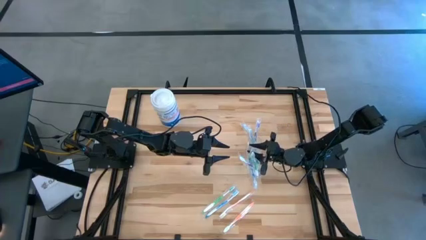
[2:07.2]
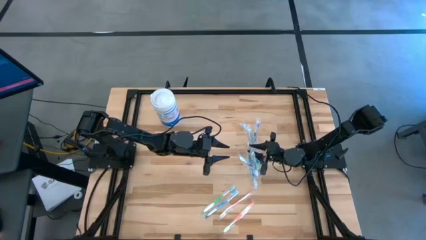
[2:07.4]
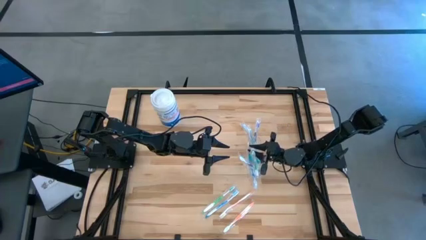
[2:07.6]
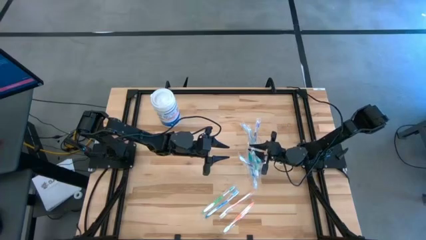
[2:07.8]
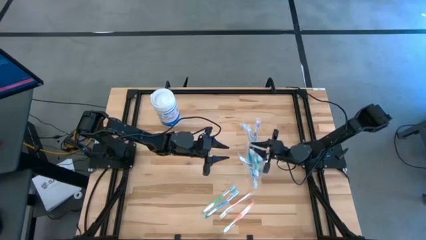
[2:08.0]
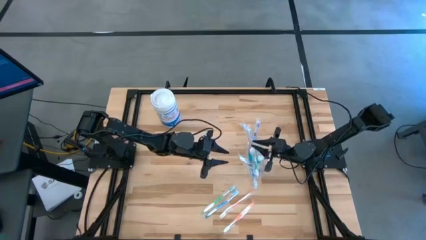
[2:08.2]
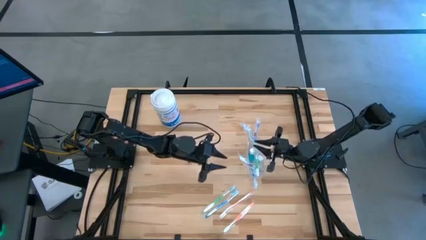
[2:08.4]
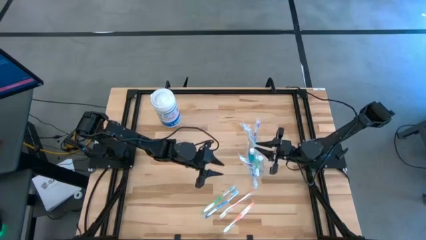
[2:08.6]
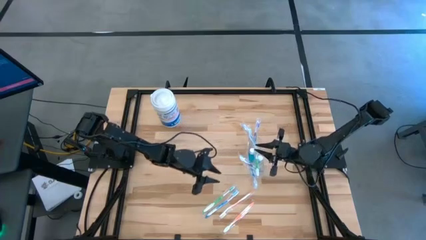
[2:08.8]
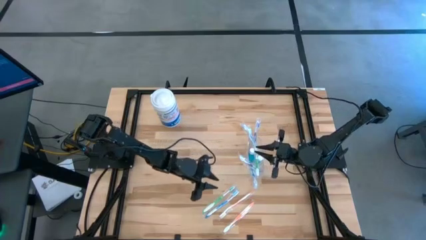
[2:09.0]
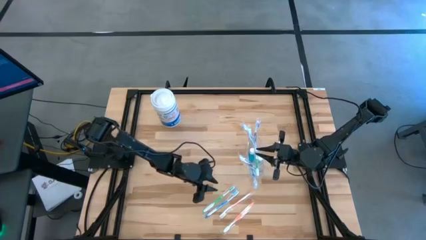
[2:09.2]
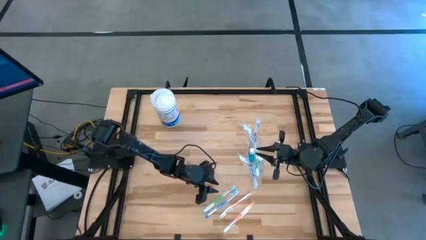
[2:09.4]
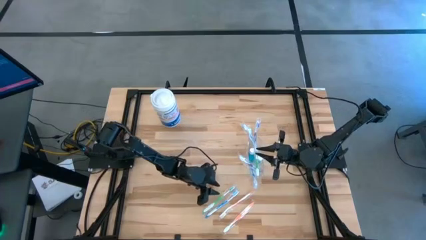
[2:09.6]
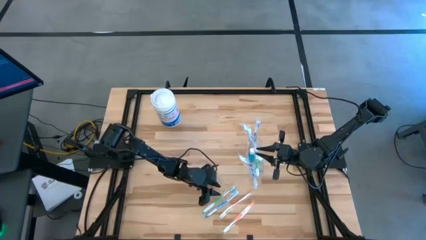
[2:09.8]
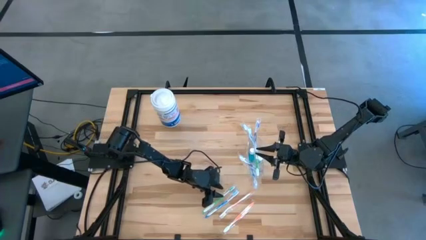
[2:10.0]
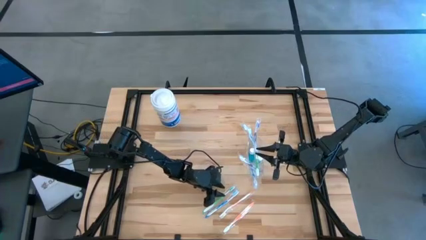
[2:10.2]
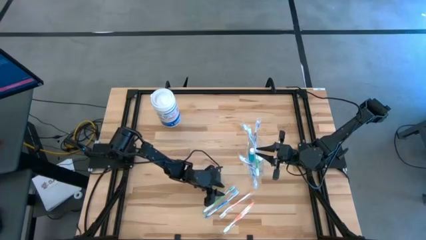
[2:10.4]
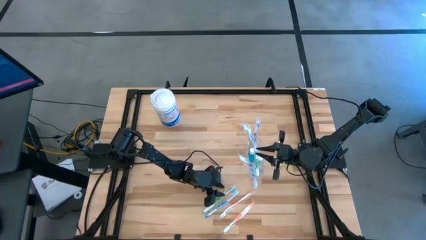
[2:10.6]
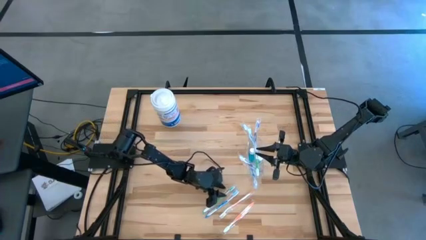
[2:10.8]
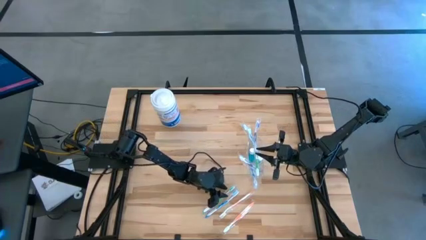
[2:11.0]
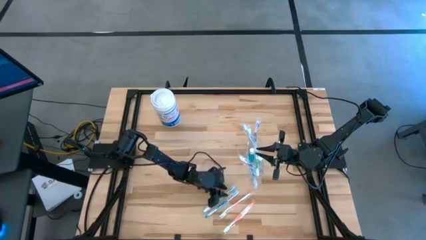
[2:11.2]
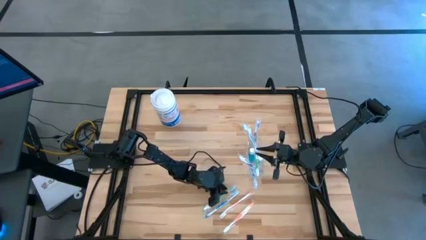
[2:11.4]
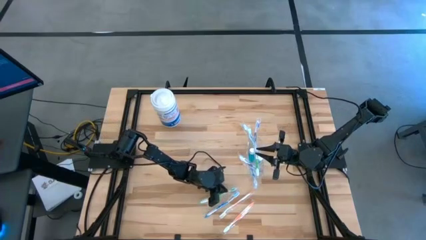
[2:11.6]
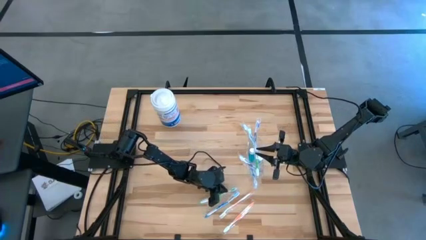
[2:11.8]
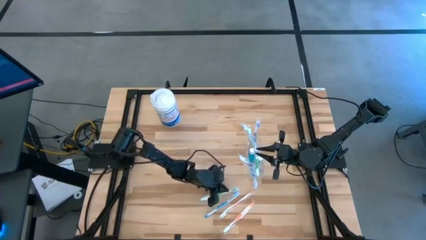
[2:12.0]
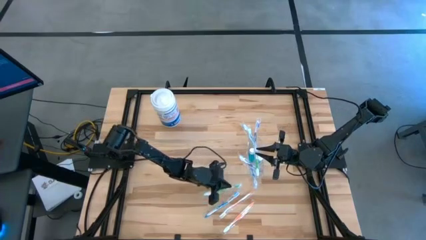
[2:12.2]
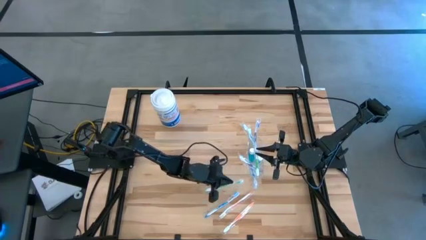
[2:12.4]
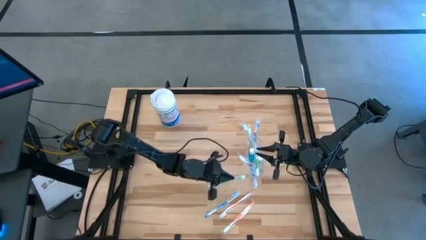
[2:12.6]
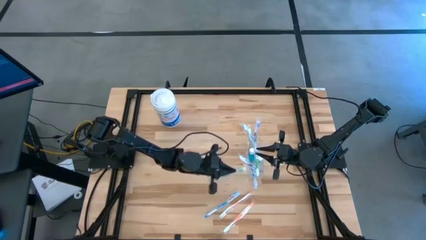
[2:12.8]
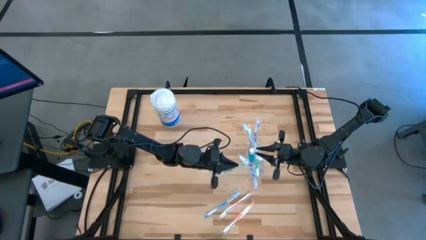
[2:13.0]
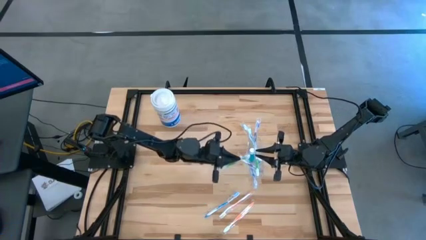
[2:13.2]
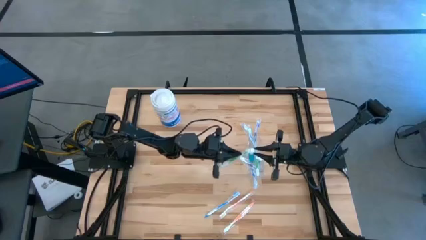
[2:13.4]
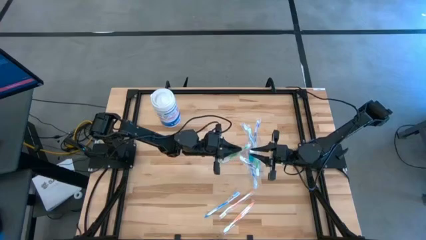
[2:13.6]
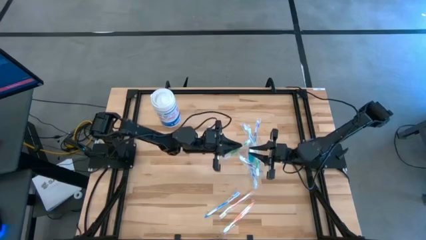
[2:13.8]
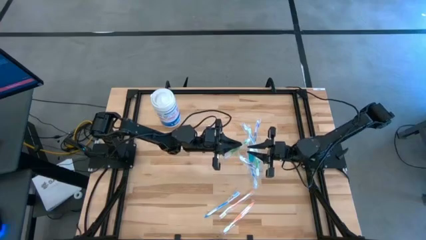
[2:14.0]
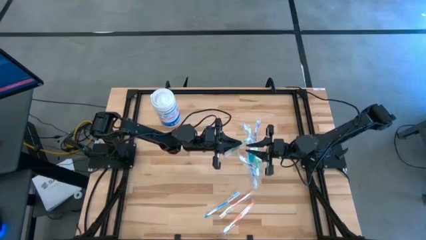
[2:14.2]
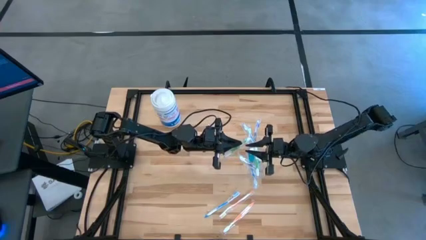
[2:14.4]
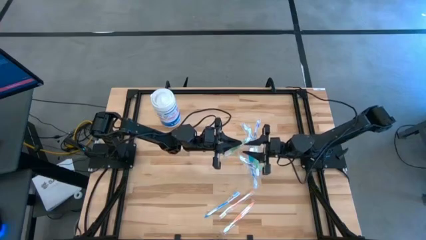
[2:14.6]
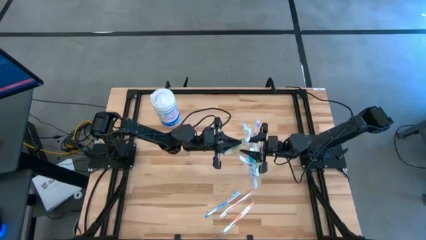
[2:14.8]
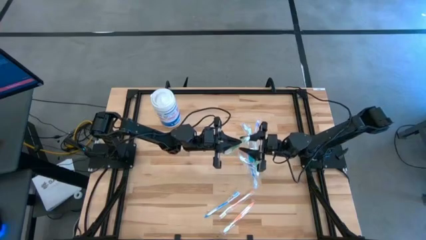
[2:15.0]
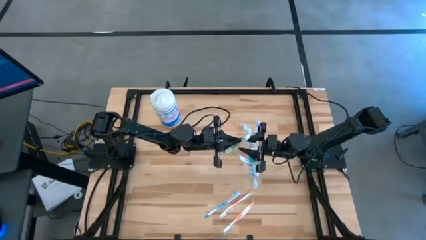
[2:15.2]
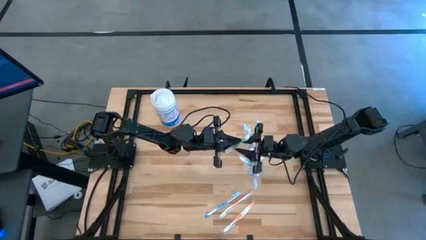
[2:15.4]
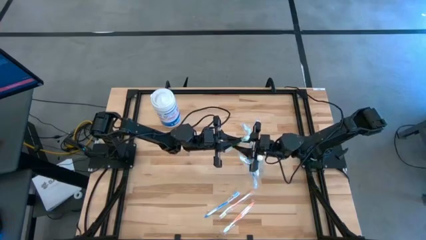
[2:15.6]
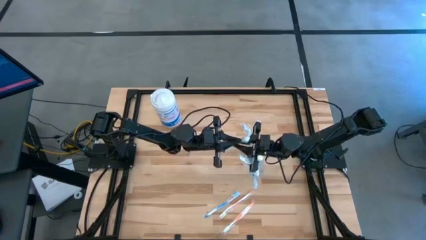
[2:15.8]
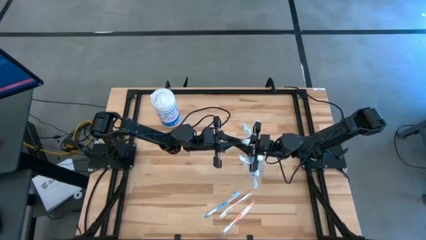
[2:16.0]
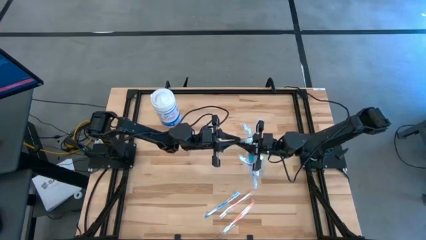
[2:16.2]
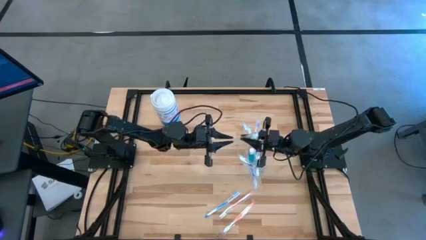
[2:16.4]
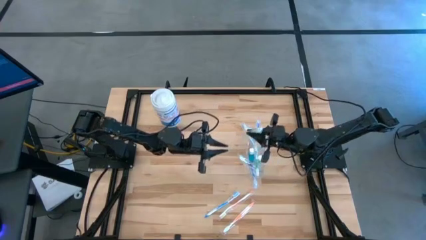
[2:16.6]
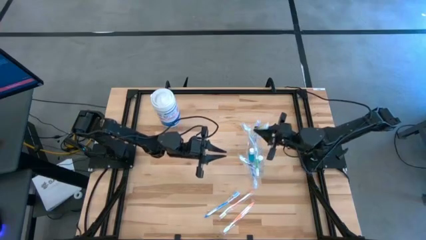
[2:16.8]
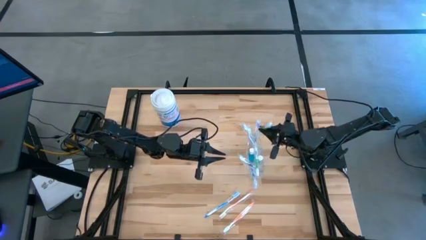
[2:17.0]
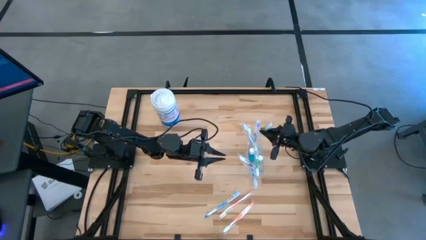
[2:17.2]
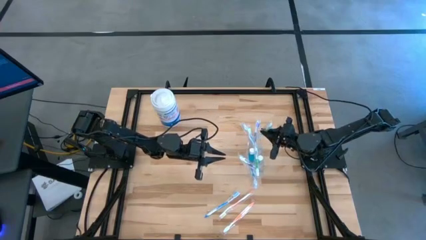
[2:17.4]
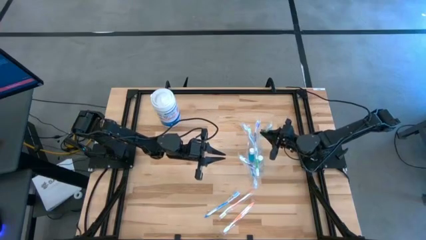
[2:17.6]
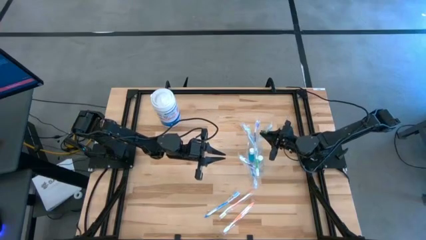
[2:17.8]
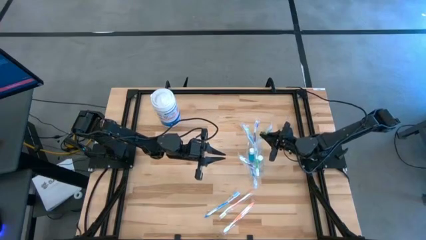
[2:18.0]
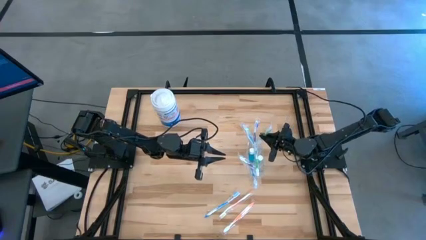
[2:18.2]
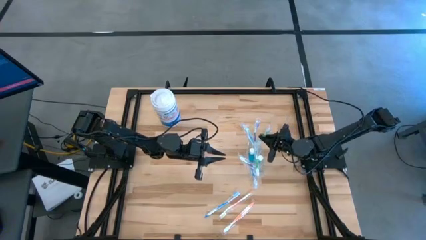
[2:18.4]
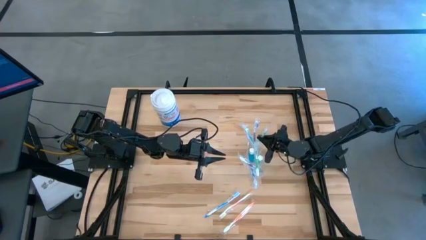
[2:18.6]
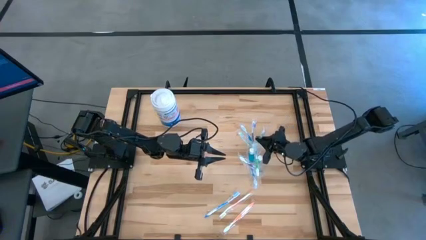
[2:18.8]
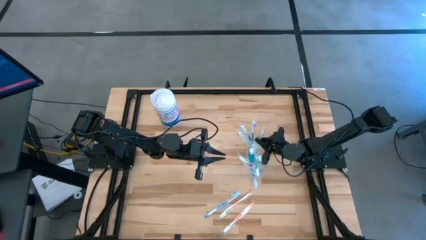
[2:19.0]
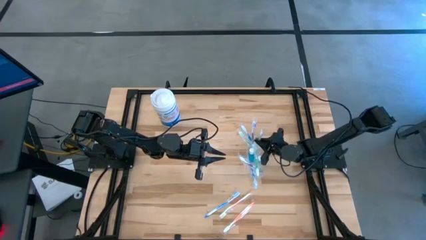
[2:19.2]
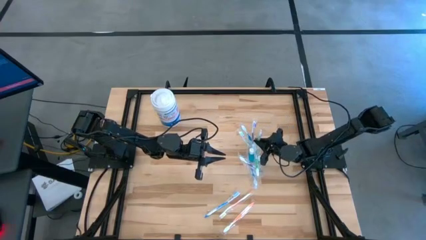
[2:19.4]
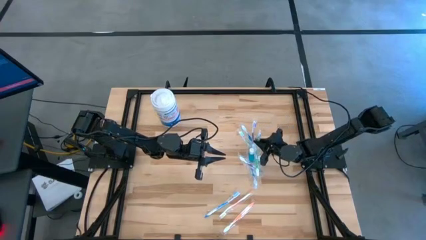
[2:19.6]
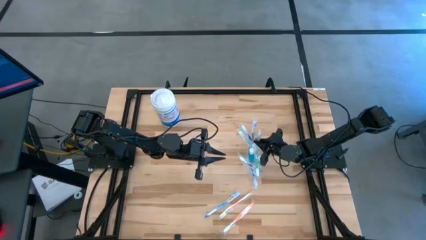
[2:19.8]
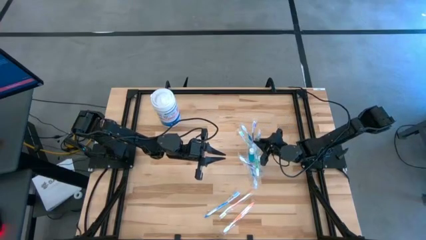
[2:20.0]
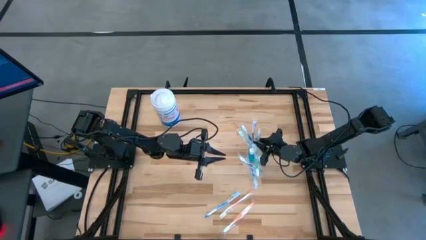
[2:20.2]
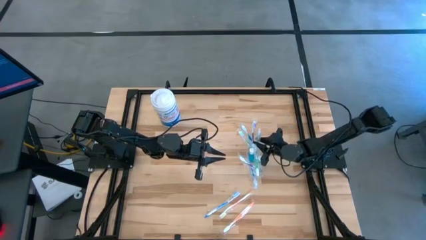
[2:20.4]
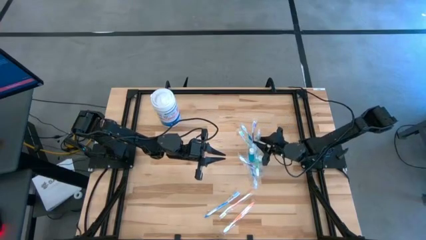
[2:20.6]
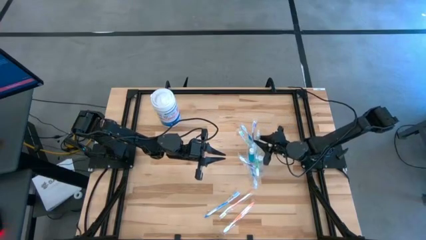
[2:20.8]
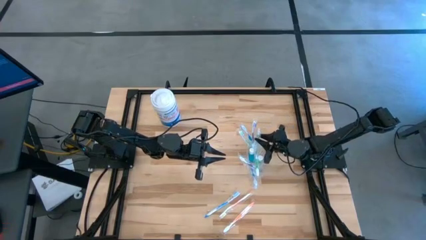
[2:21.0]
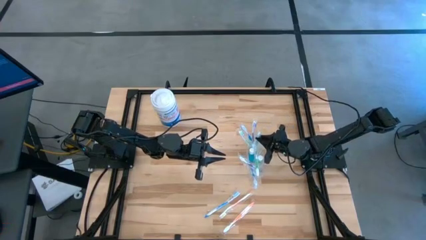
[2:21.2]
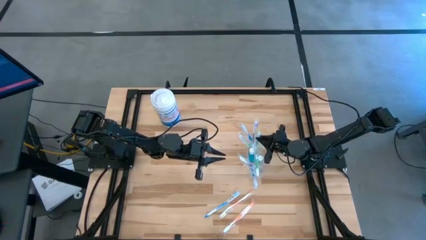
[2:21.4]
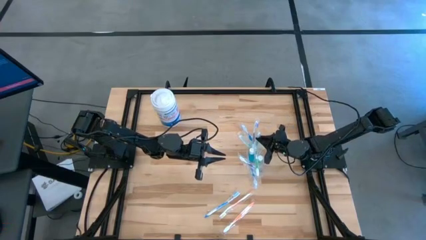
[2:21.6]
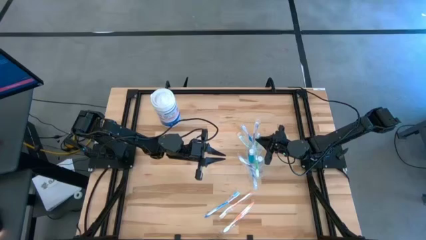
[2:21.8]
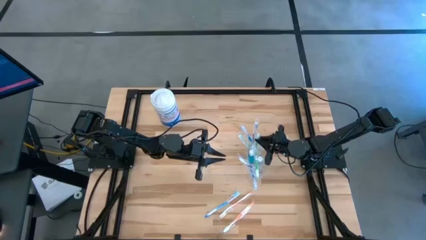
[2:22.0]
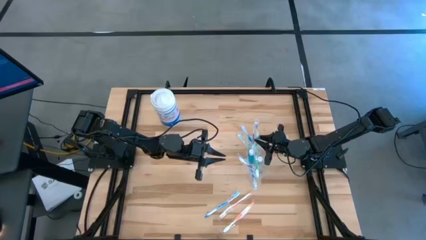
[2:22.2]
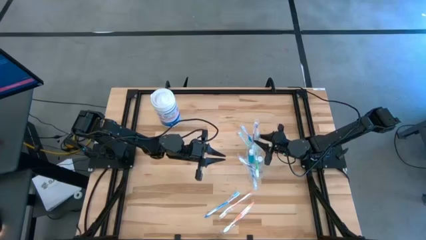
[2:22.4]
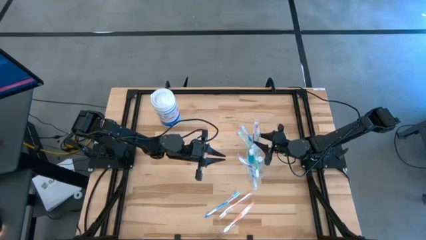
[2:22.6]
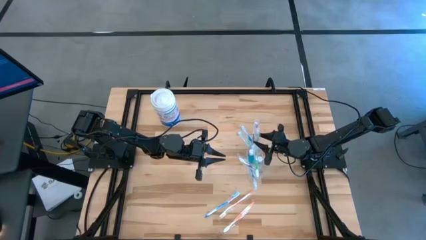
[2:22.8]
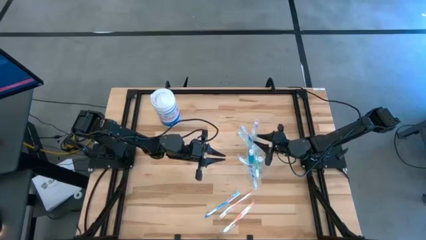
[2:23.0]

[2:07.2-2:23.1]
Task: Pick & Place toothbrushing station
Put the green toothbrush into the transparent organizer

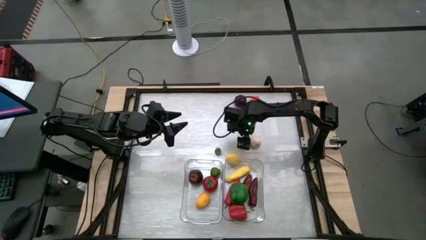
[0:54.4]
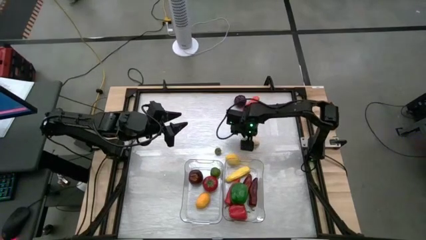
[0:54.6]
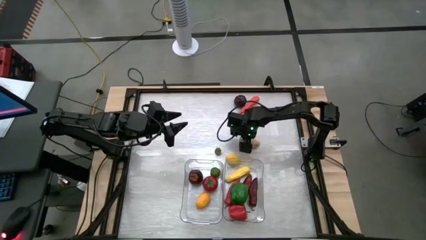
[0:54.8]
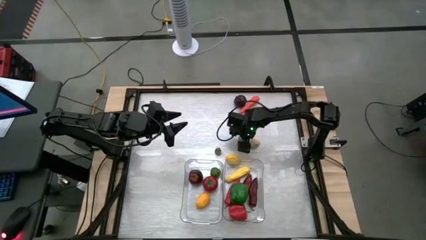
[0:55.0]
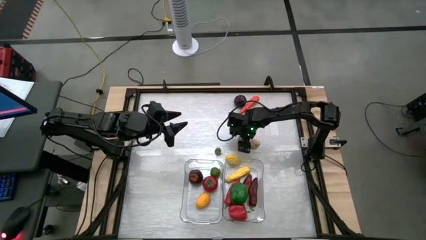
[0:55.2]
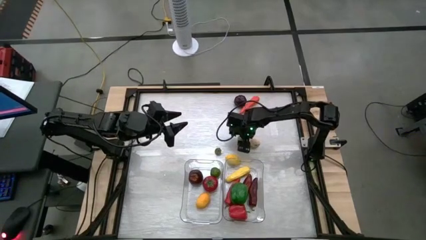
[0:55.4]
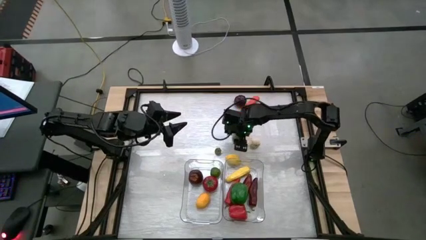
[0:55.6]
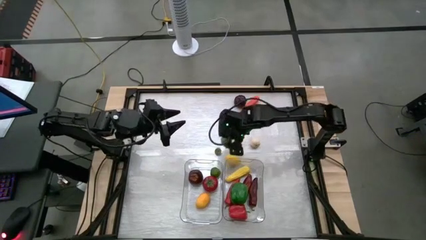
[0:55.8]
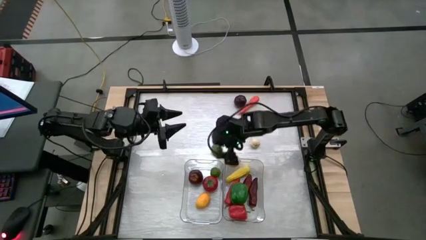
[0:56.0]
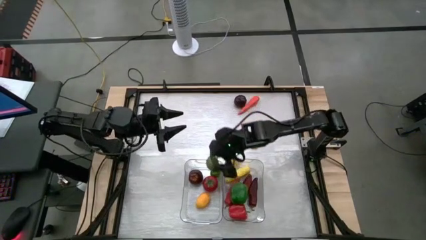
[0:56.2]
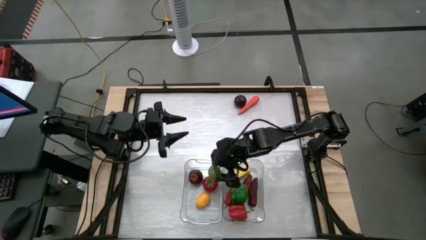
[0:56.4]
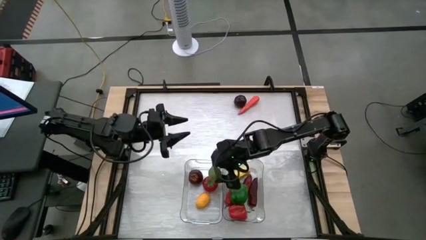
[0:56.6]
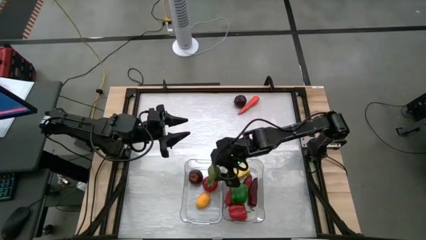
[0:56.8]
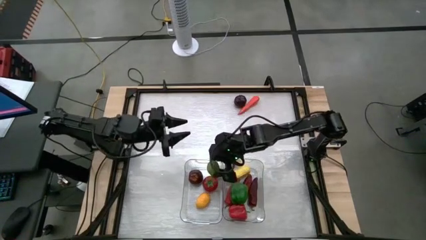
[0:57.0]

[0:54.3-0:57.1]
Task: Sort produce into baskets
Put the lime into the left transparent bin
